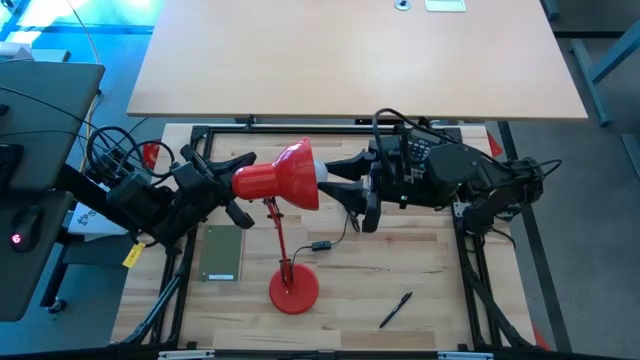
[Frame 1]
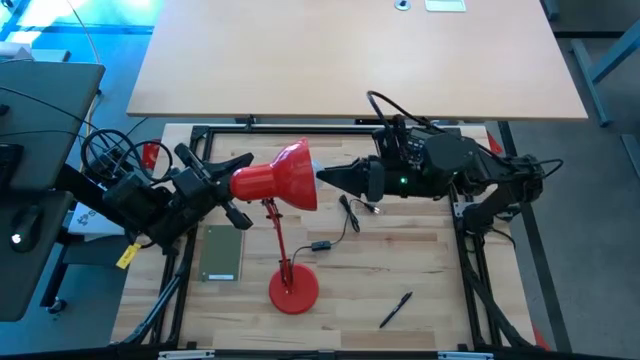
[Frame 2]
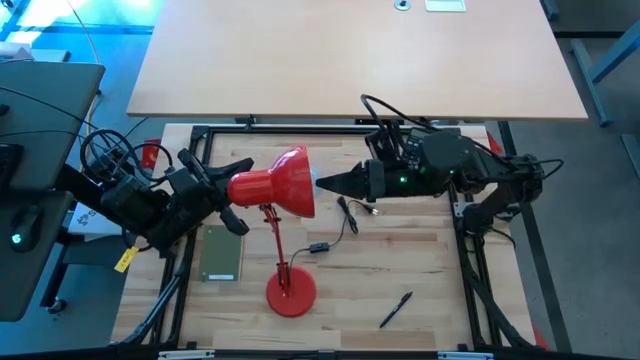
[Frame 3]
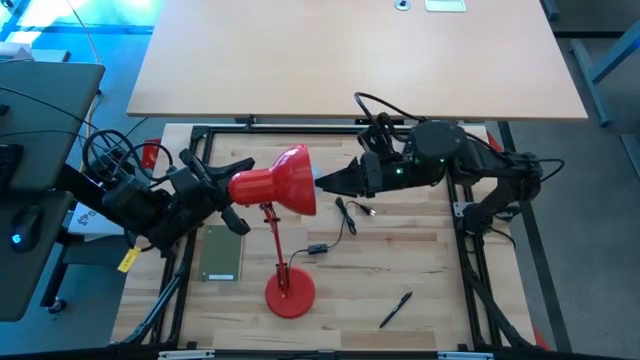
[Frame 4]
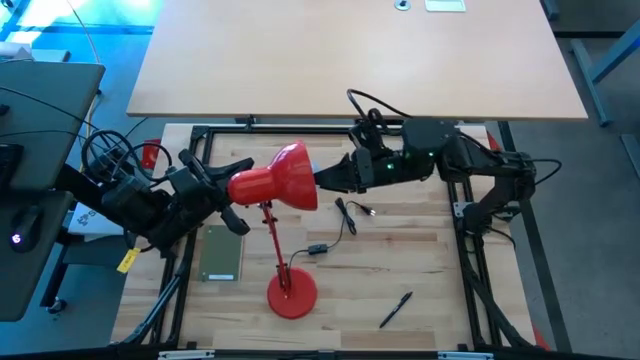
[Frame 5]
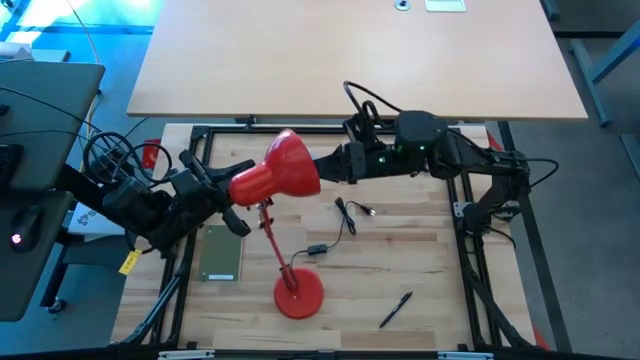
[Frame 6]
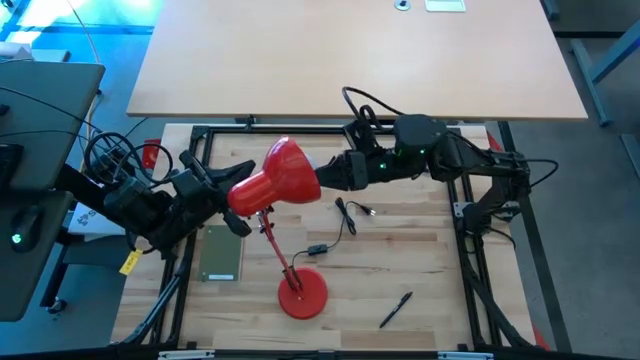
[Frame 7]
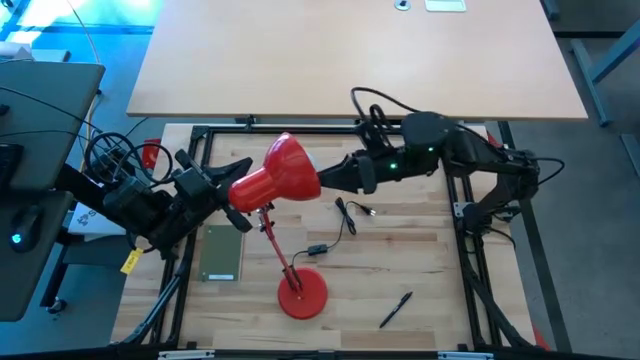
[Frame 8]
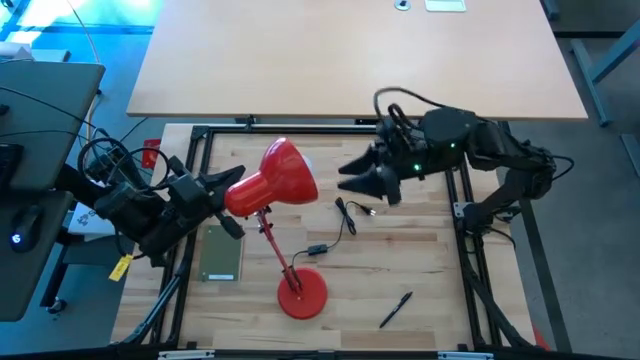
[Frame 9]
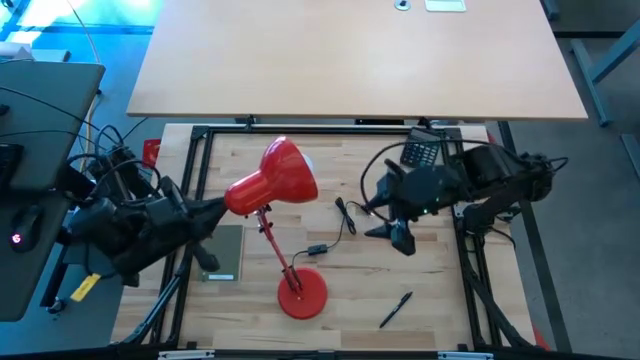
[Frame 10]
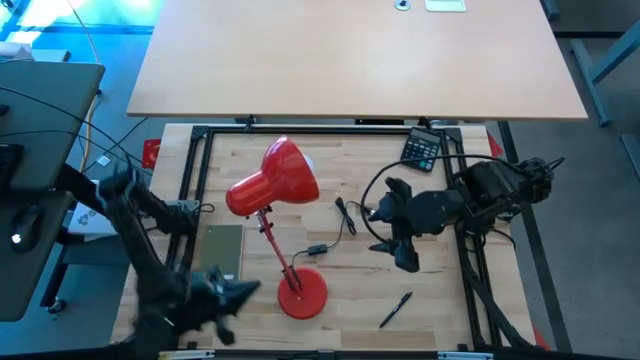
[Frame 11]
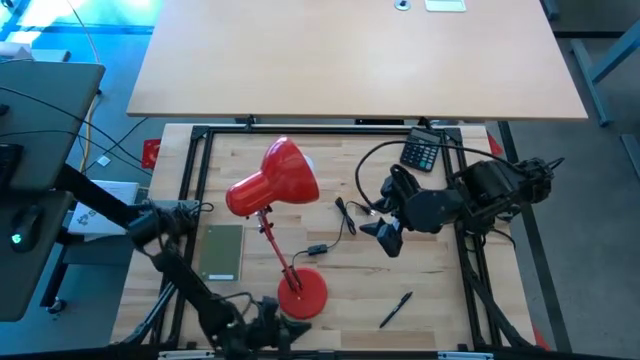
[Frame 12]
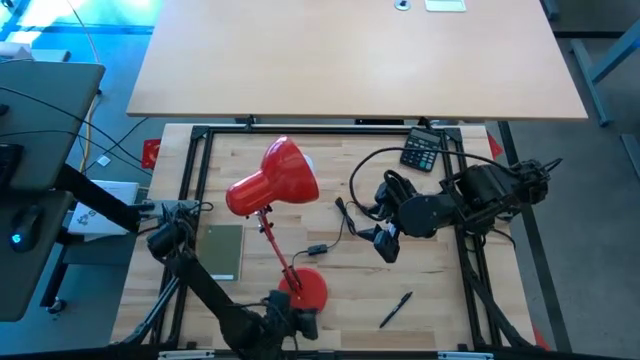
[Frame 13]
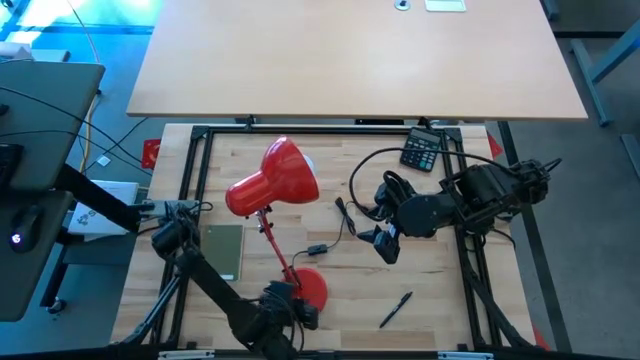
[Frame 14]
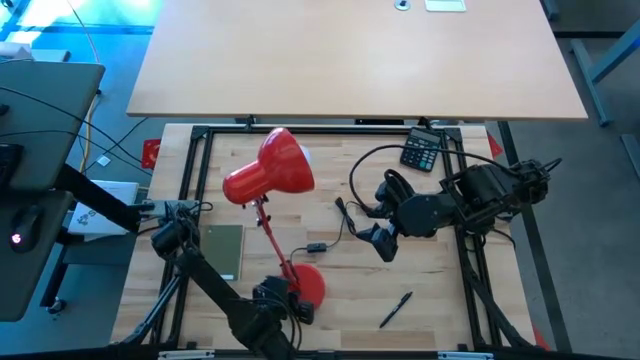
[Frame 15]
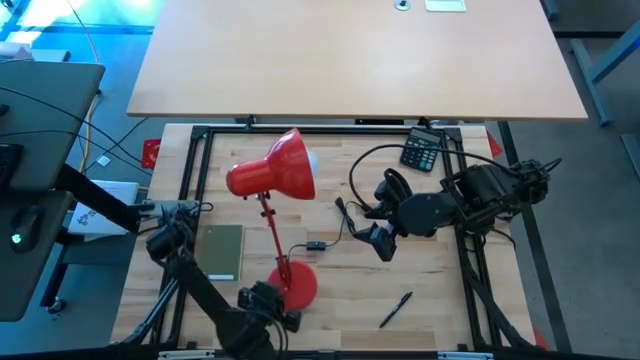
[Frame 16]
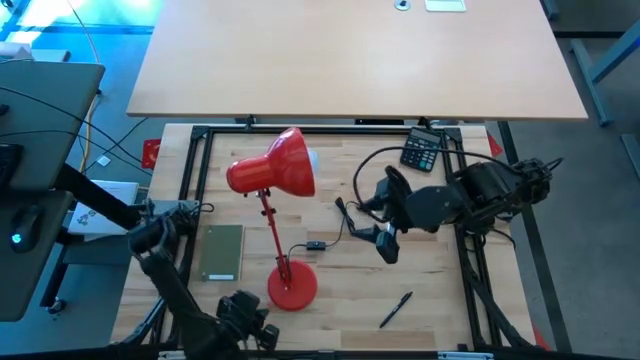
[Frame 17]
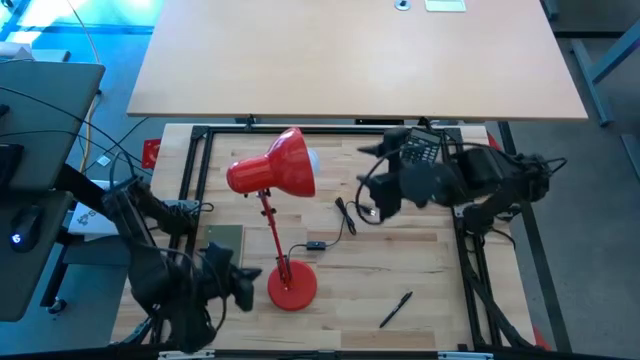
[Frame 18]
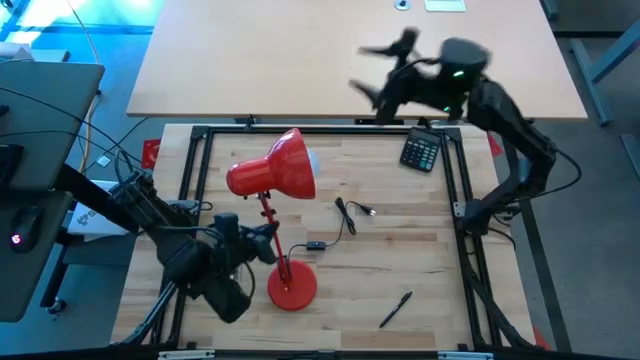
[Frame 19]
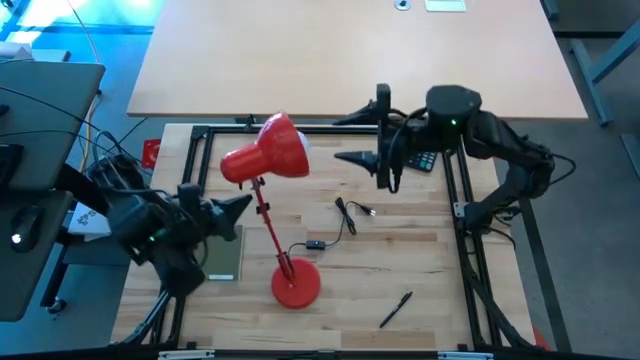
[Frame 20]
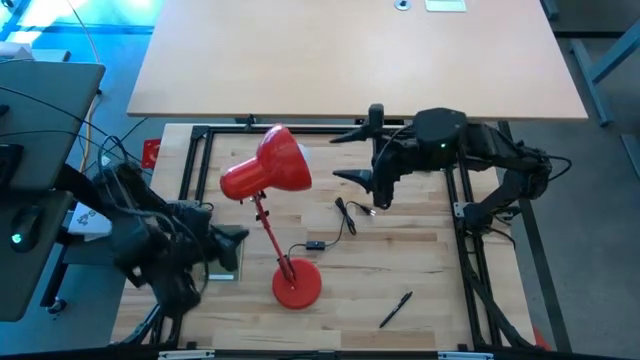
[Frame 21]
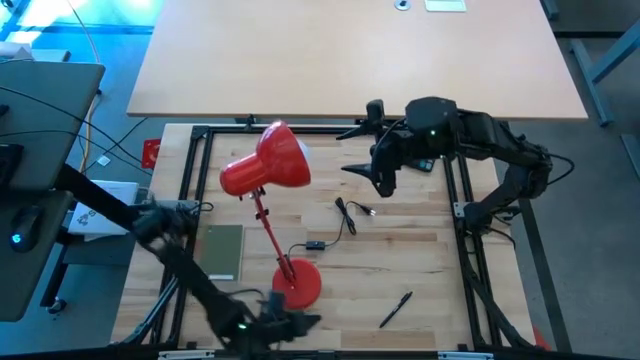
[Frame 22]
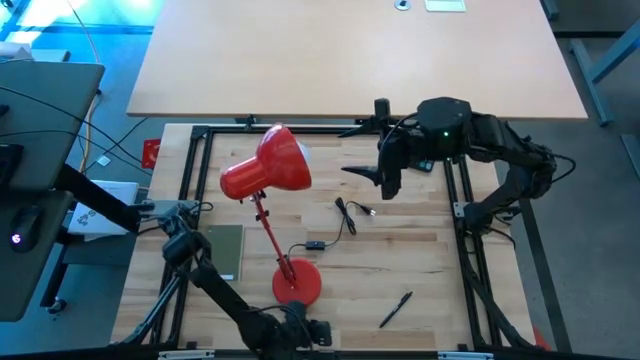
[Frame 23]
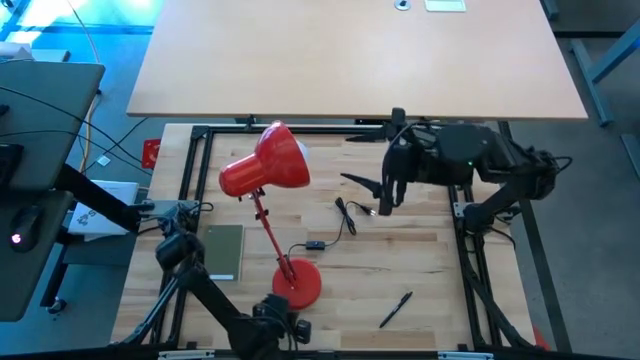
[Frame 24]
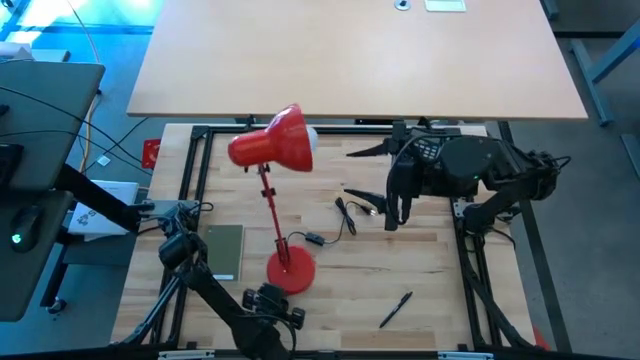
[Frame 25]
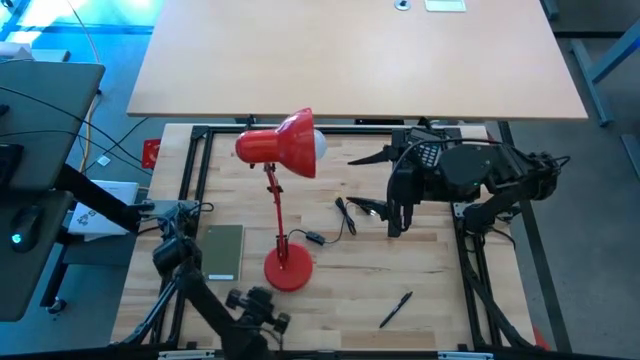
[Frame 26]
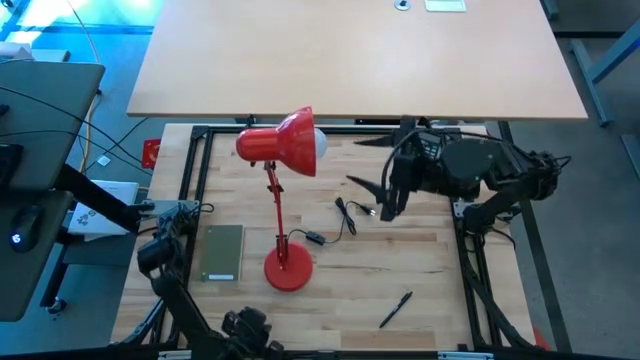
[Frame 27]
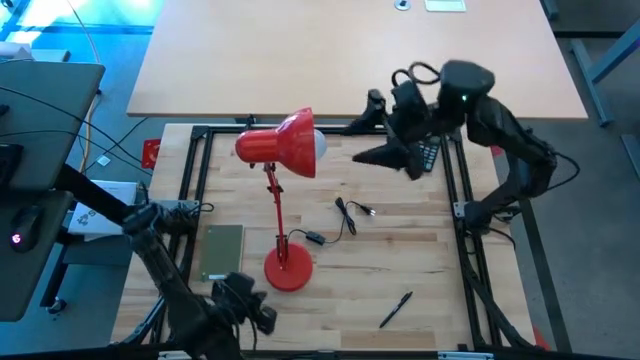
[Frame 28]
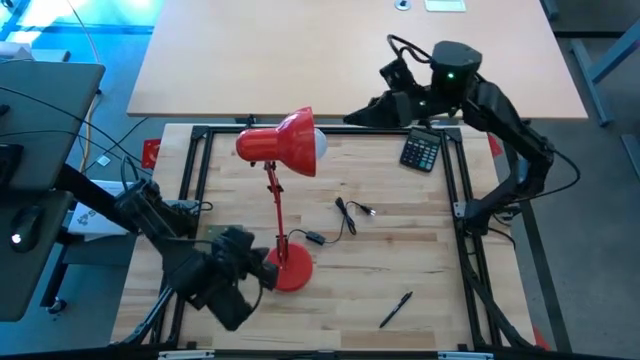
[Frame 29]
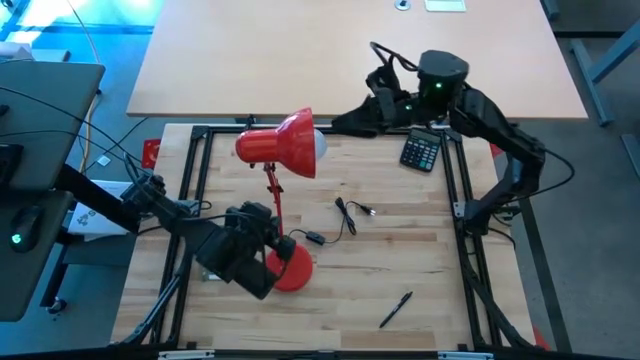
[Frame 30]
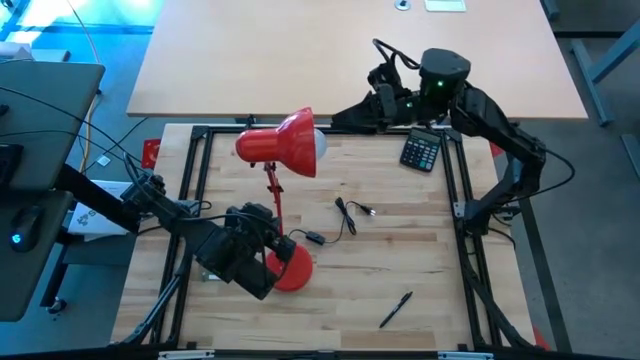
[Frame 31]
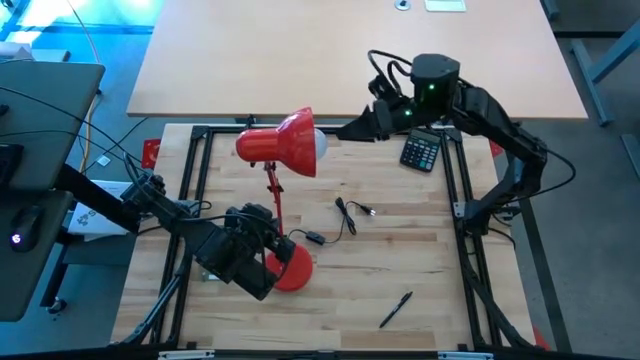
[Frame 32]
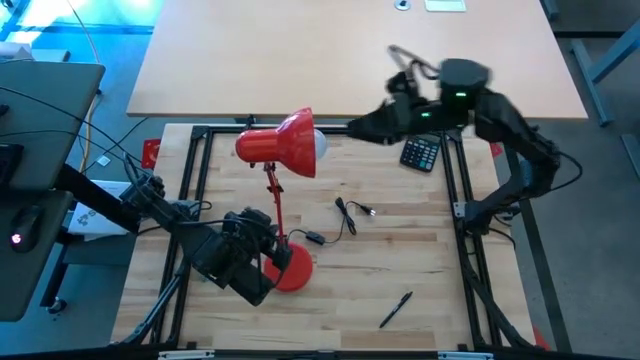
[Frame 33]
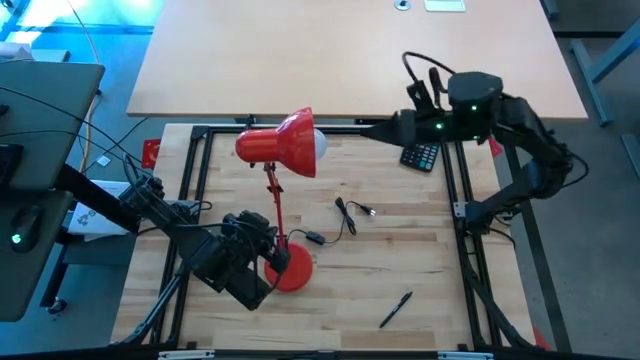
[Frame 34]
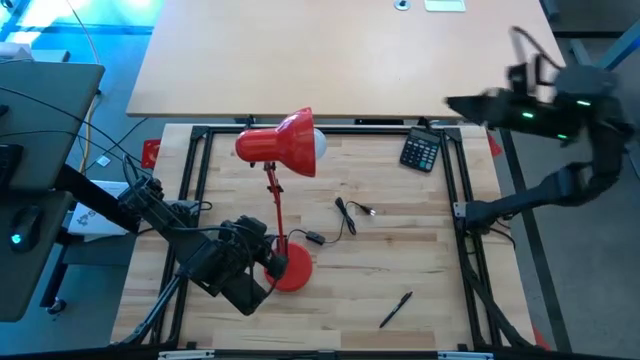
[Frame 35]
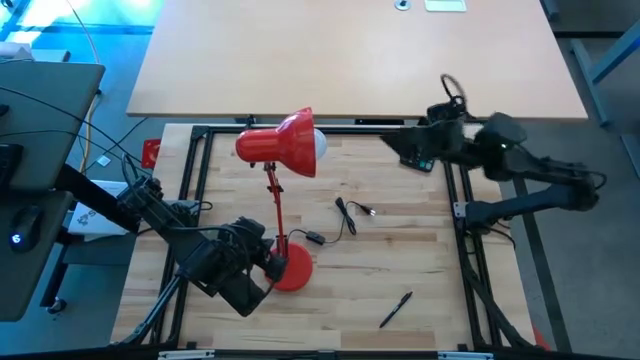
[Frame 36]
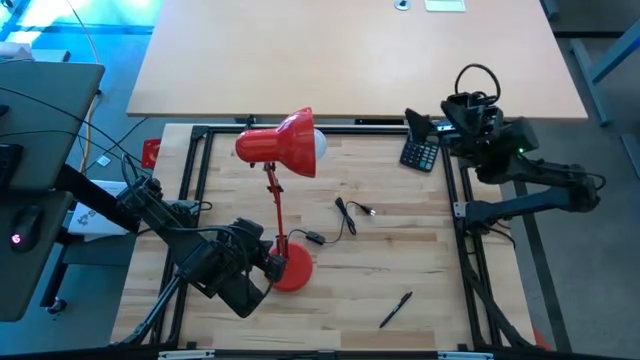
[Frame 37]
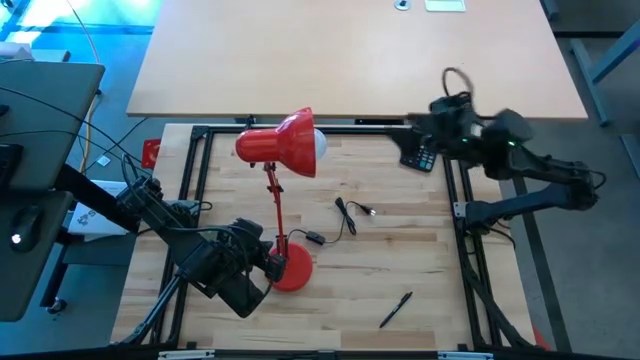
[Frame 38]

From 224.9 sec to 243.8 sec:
Task: Screw lightbulb
Insert the white lightbulb into the red lamp

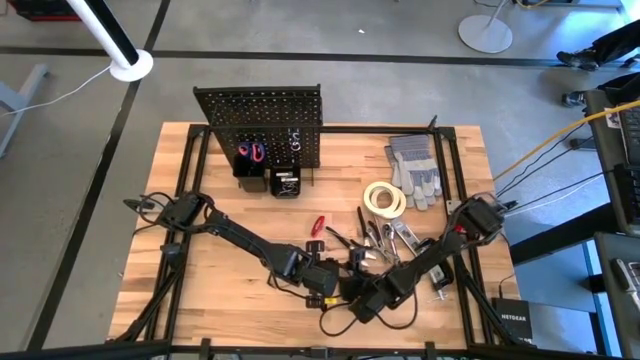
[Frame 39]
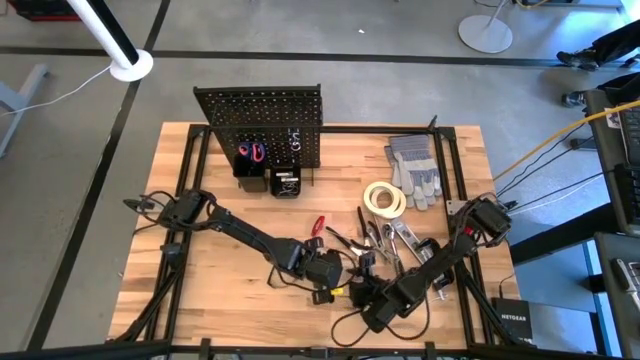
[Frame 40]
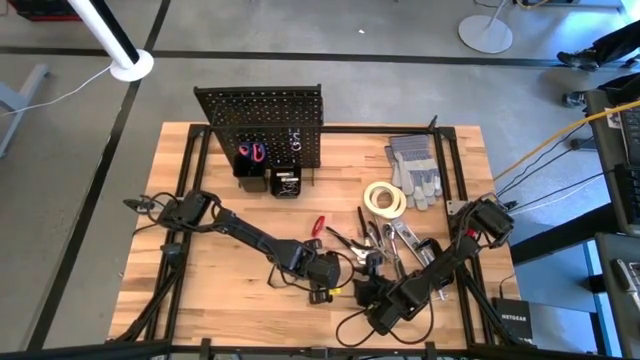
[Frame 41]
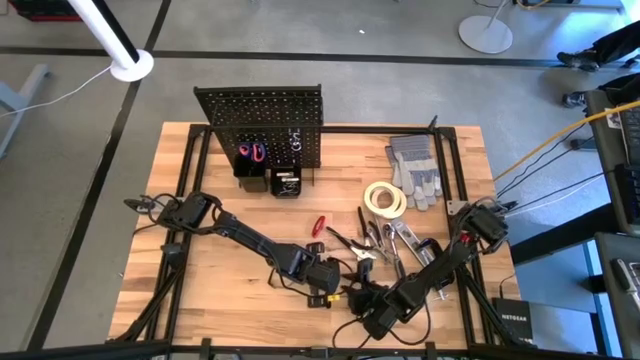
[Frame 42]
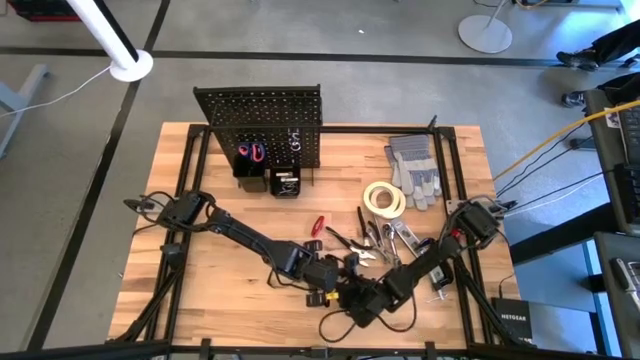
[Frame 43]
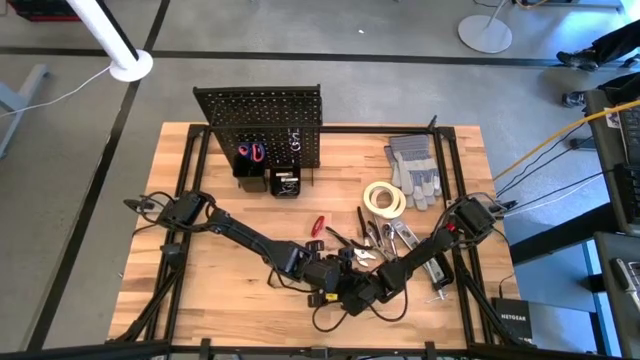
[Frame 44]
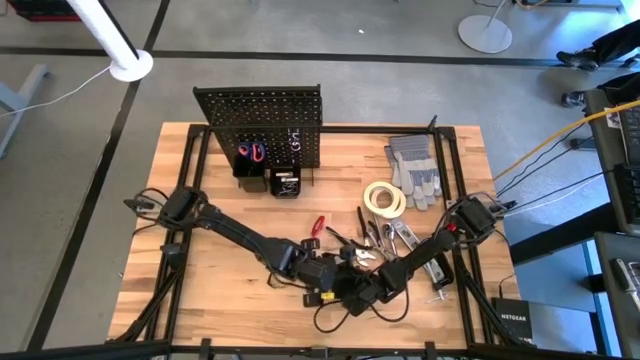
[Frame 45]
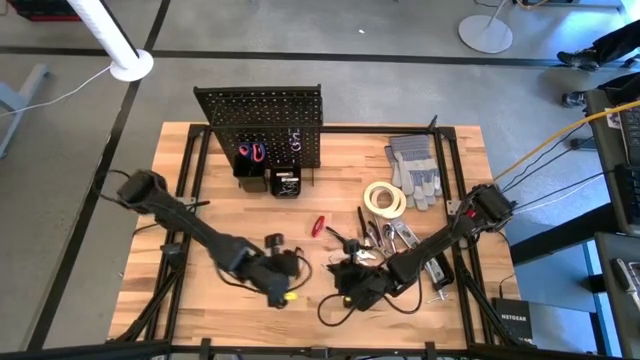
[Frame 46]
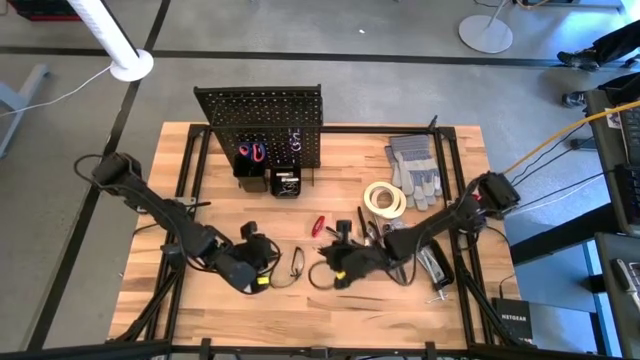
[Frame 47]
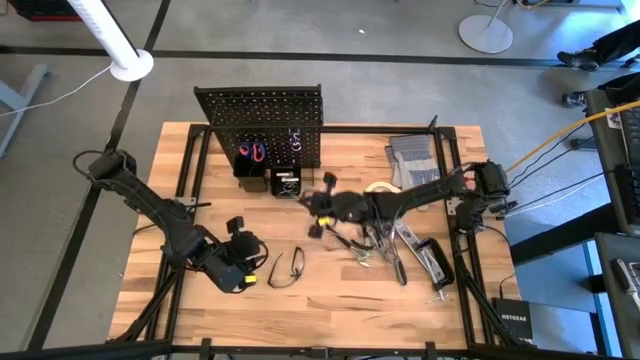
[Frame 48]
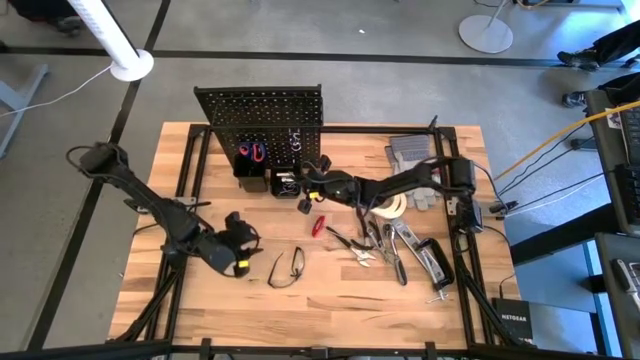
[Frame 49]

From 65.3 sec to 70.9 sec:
Task: Hang tools onto peg board
Put the hook into the right pegboard organizer bin
